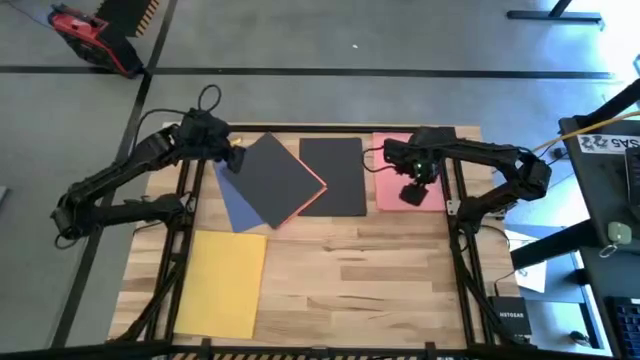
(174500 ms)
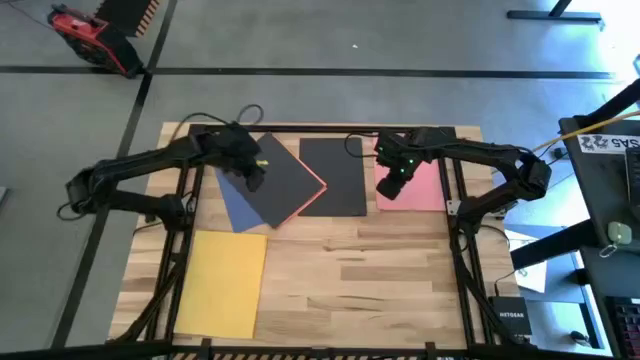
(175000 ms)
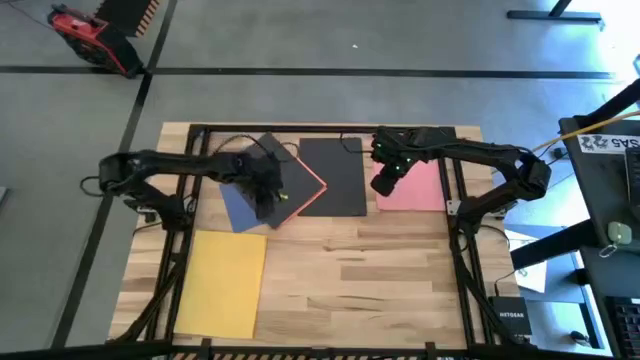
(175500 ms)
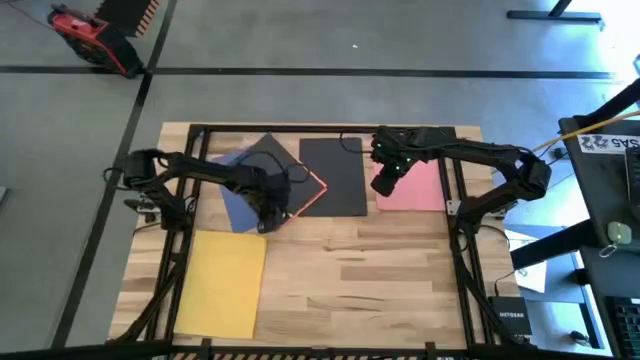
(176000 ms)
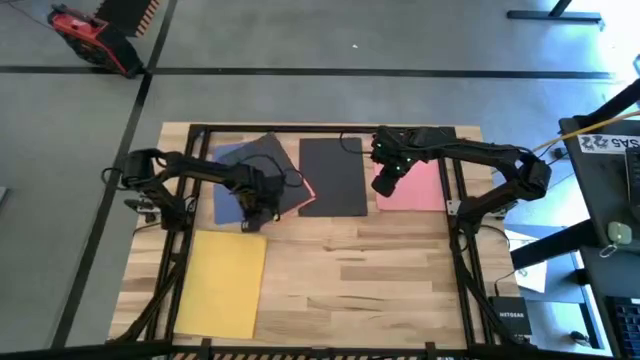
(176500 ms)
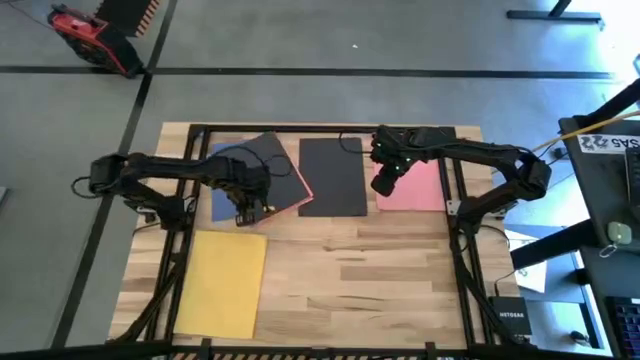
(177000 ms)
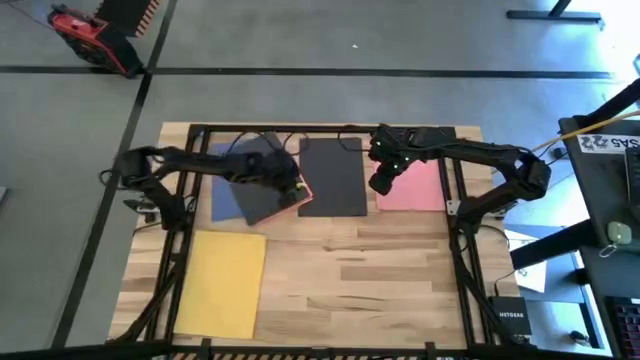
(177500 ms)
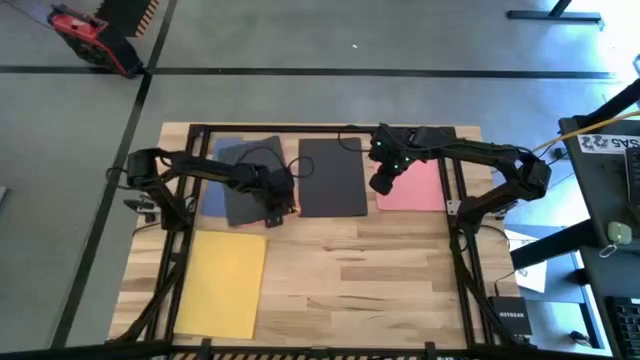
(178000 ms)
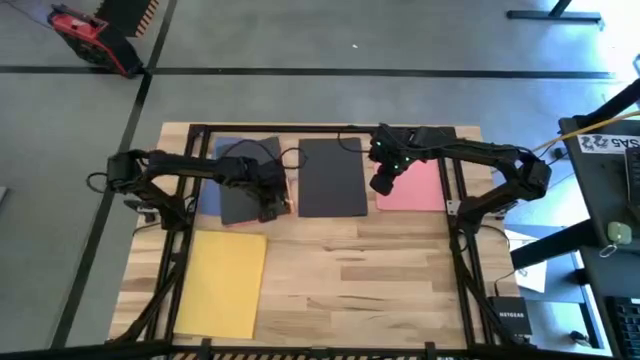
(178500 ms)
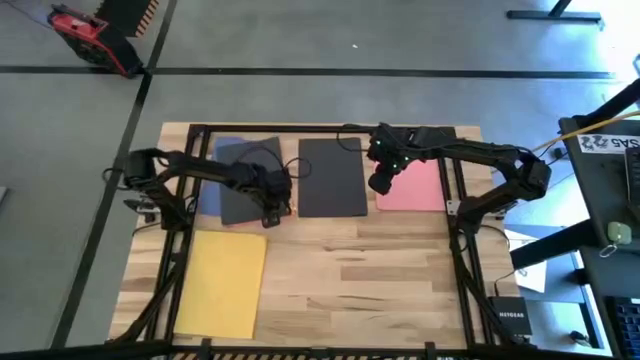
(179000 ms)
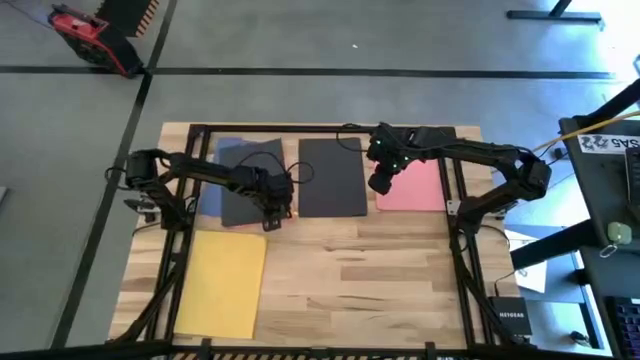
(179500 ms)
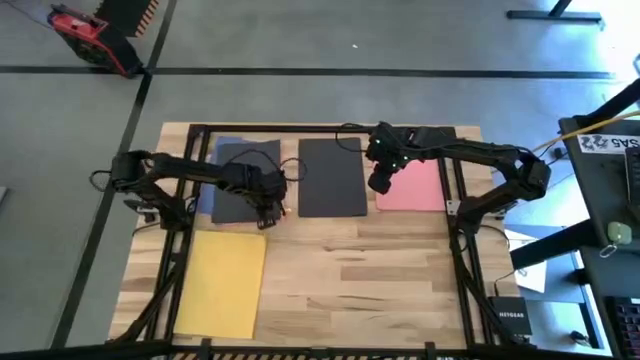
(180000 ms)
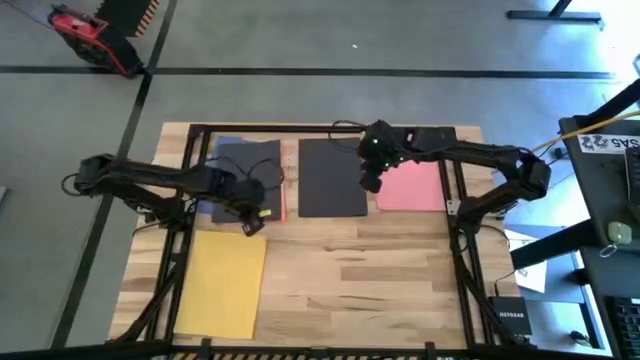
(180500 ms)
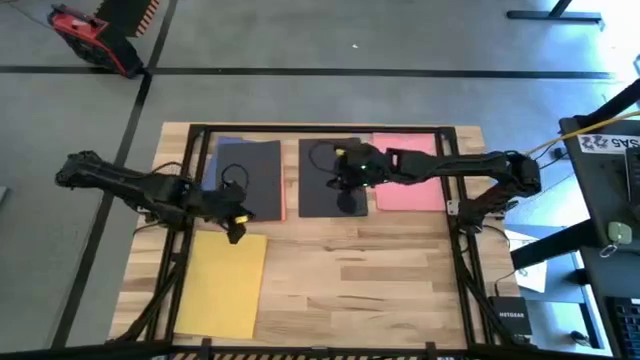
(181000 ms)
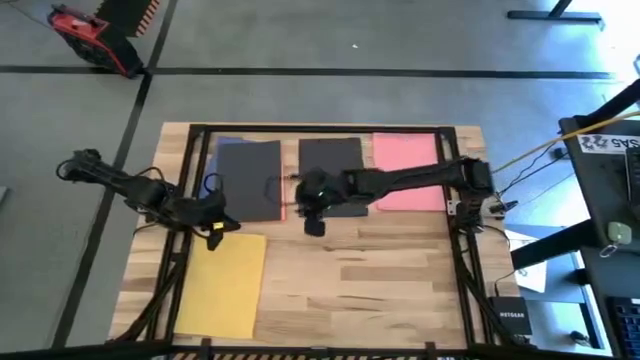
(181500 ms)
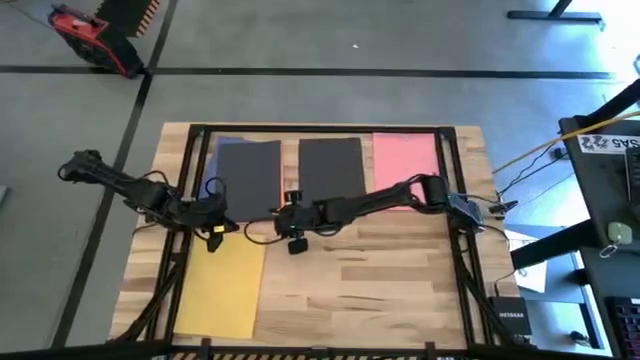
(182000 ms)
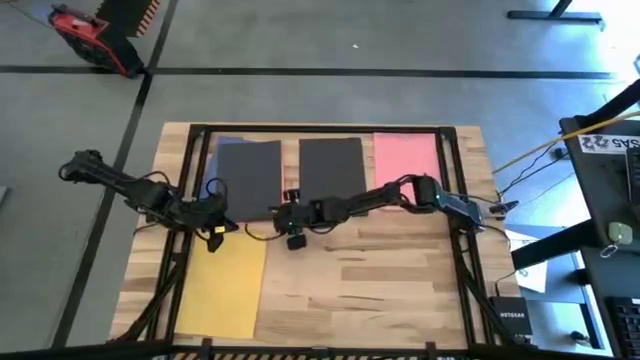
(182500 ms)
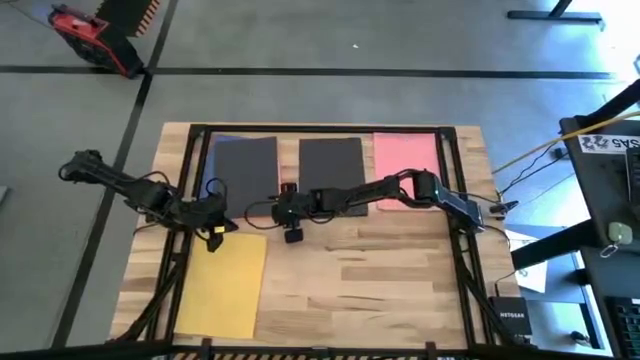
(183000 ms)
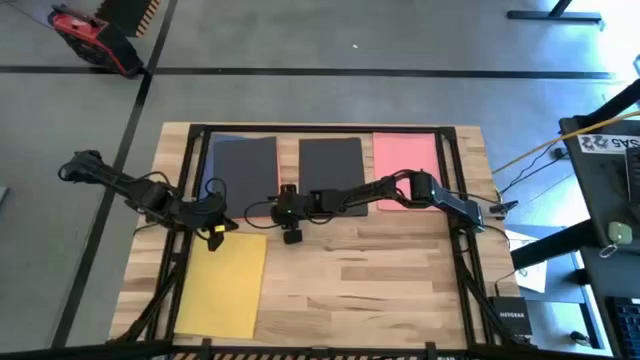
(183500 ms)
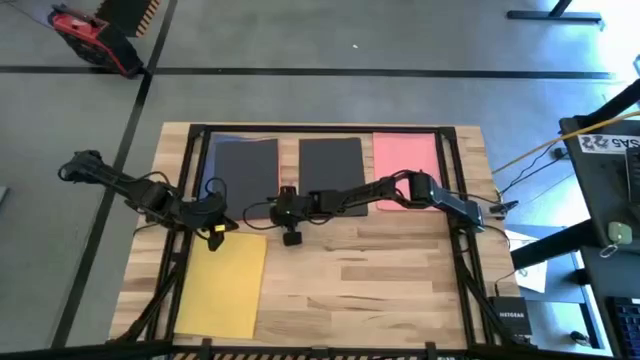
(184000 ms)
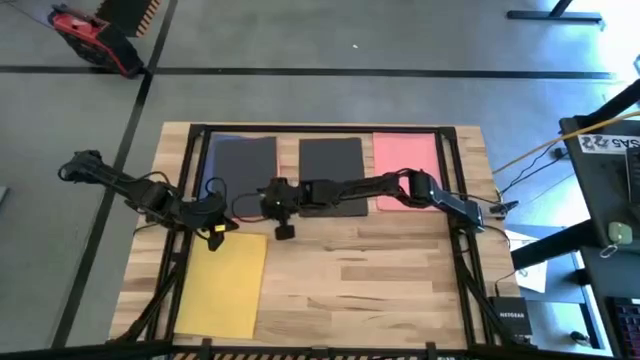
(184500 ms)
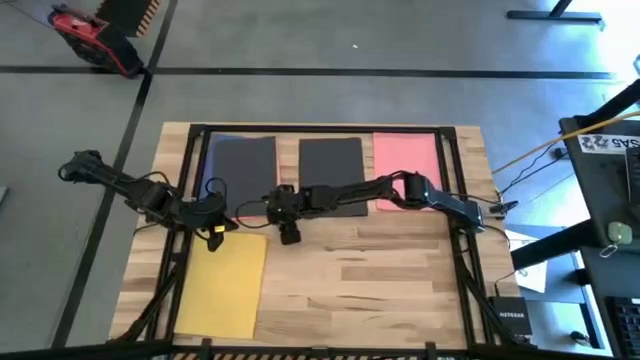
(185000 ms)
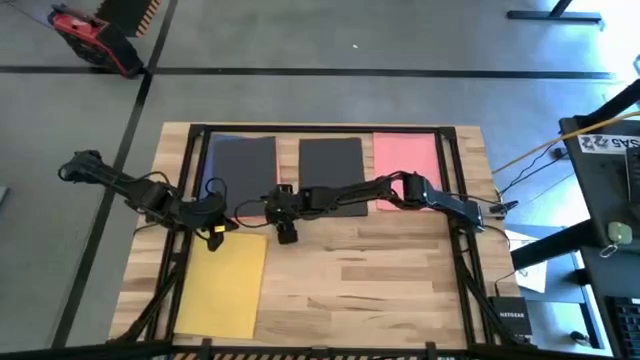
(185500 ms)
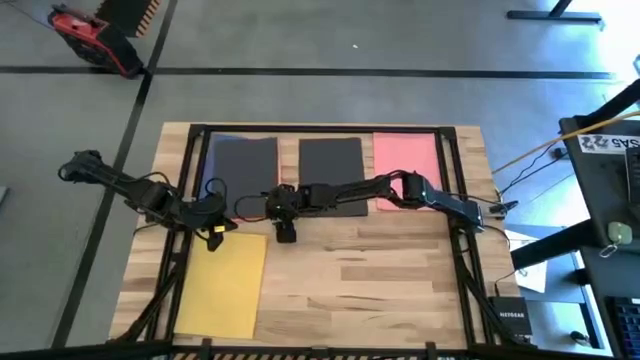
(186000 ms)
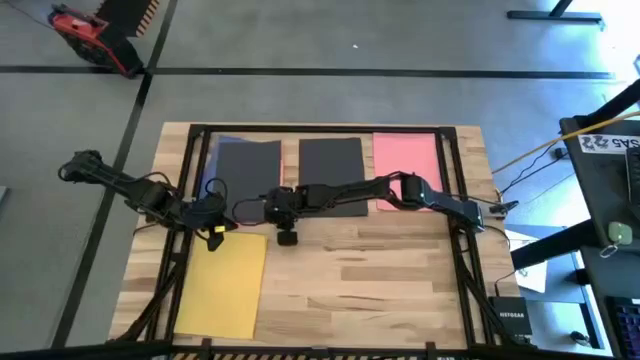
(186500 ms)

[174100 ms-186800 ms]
Task: Organize paper
Stack the black paper on top of the stacked black papers

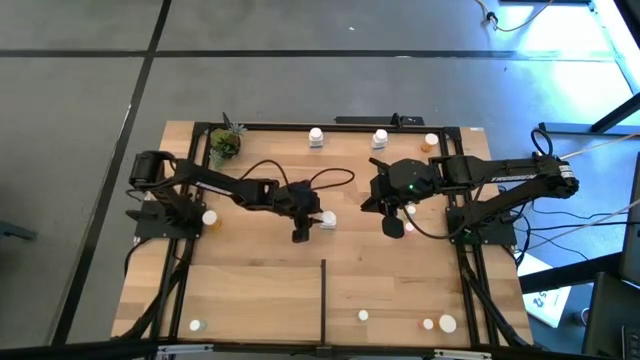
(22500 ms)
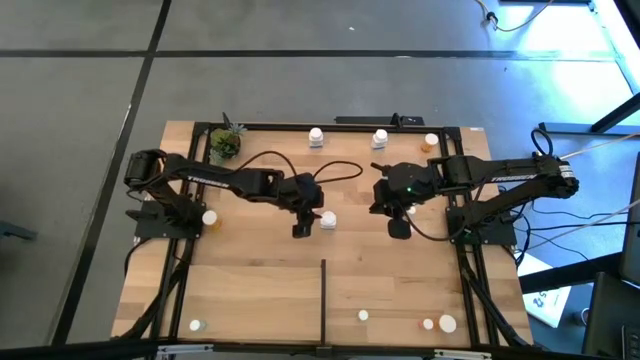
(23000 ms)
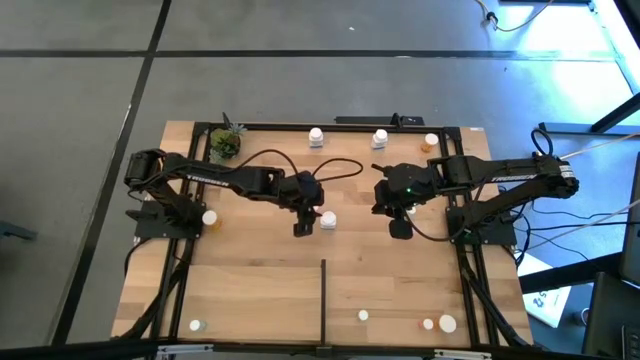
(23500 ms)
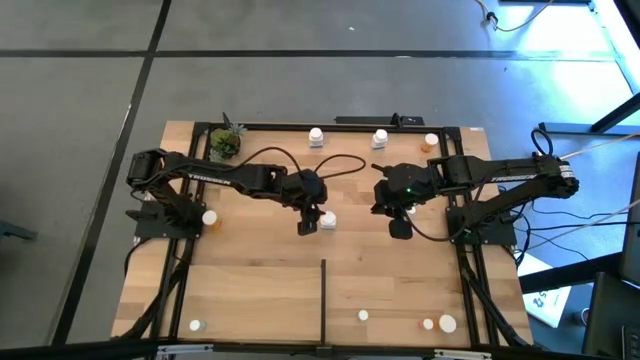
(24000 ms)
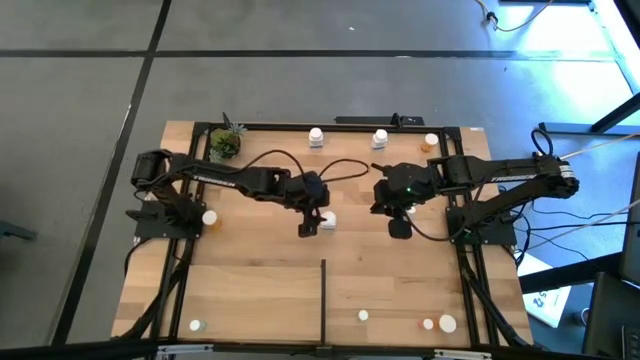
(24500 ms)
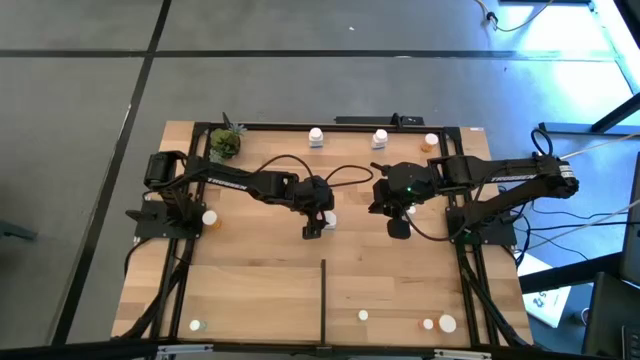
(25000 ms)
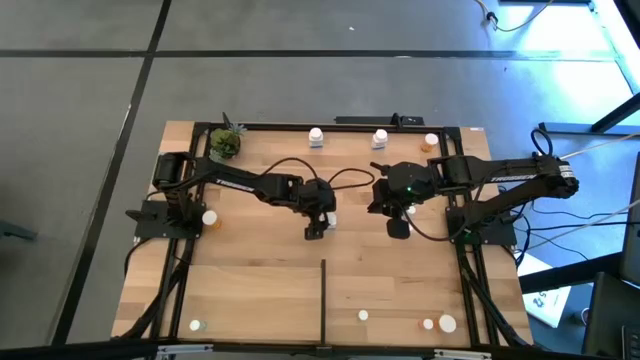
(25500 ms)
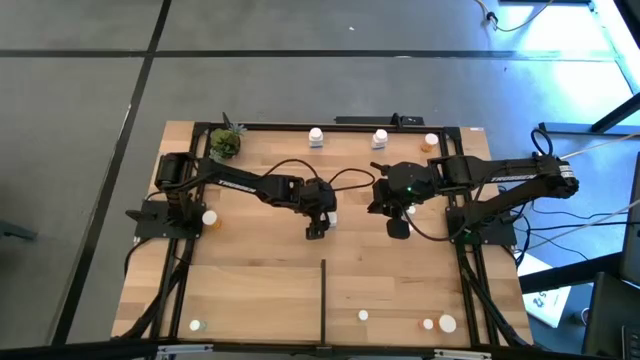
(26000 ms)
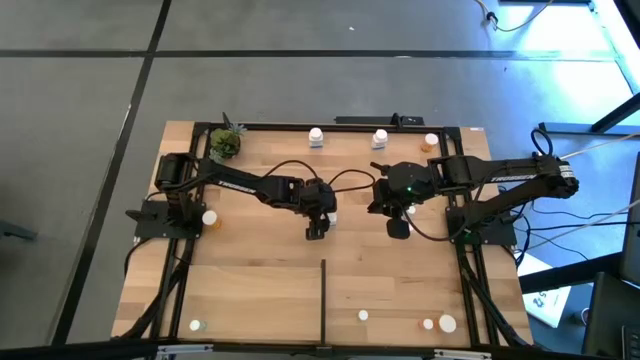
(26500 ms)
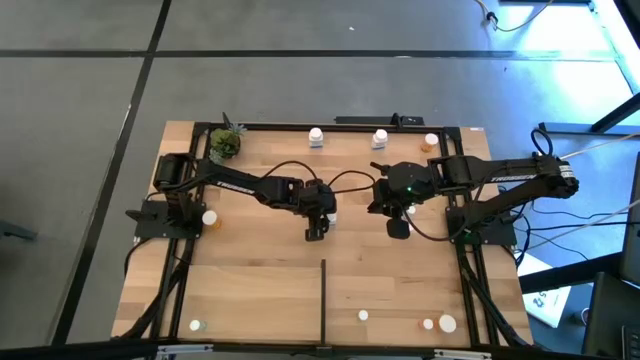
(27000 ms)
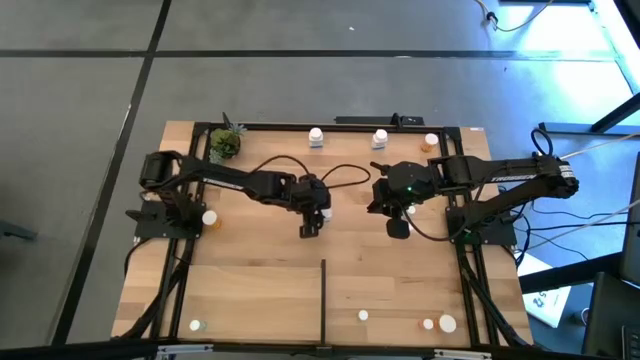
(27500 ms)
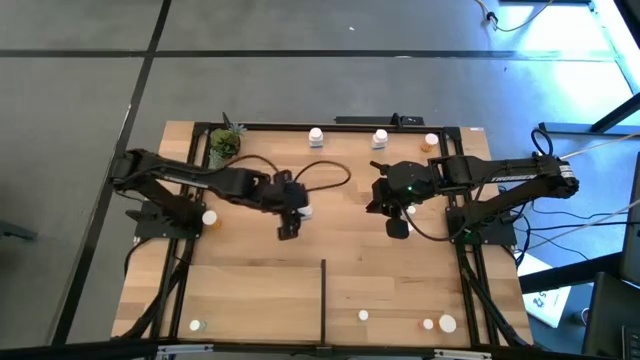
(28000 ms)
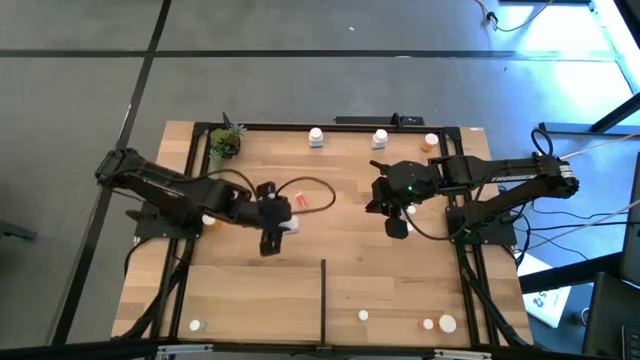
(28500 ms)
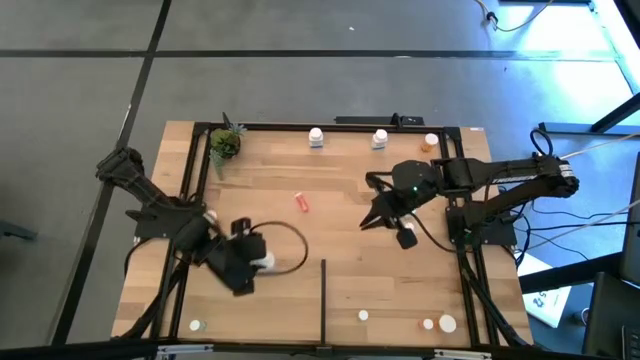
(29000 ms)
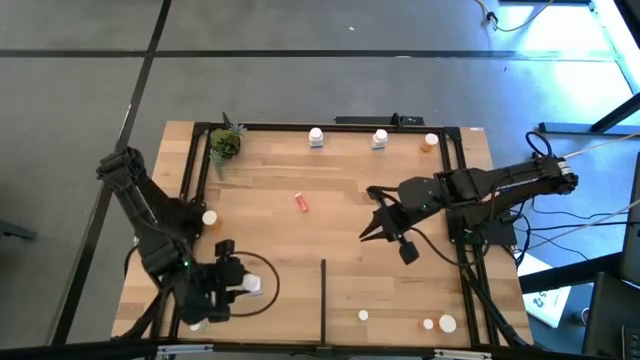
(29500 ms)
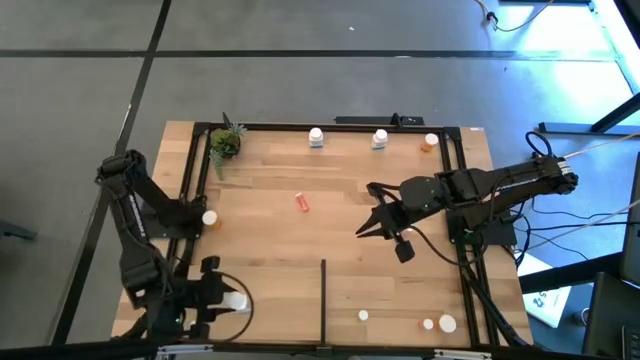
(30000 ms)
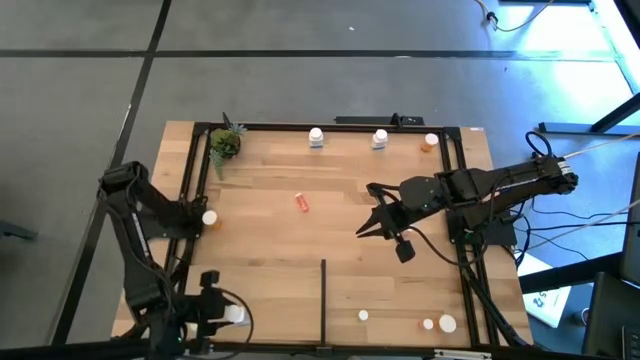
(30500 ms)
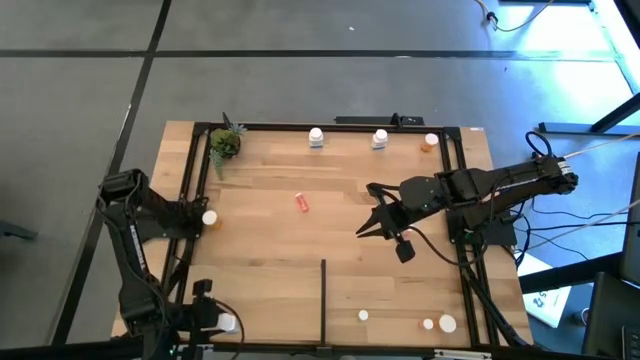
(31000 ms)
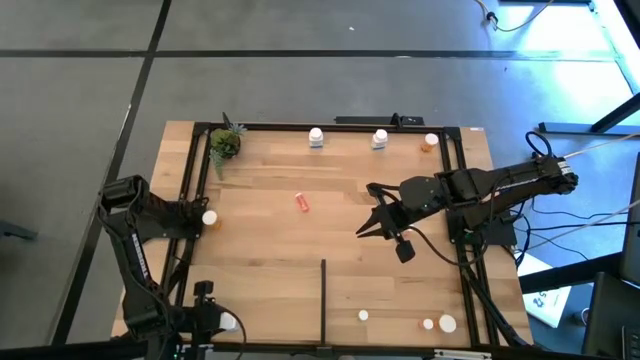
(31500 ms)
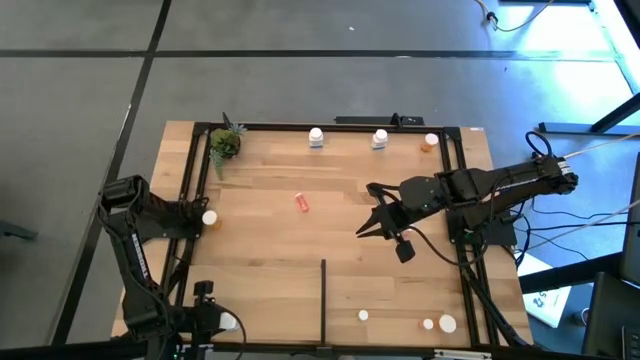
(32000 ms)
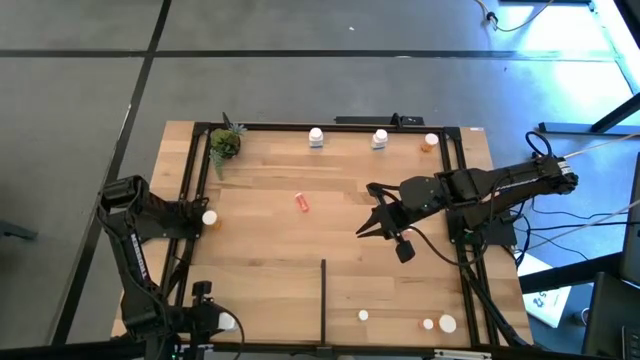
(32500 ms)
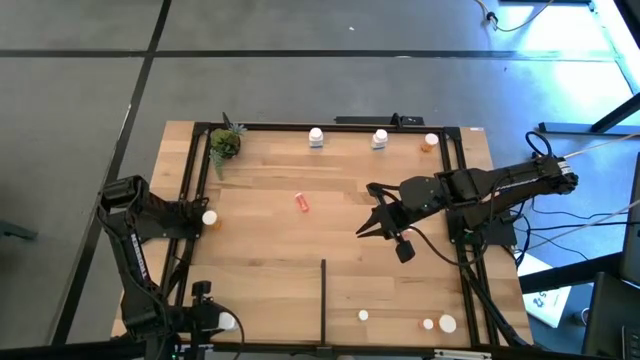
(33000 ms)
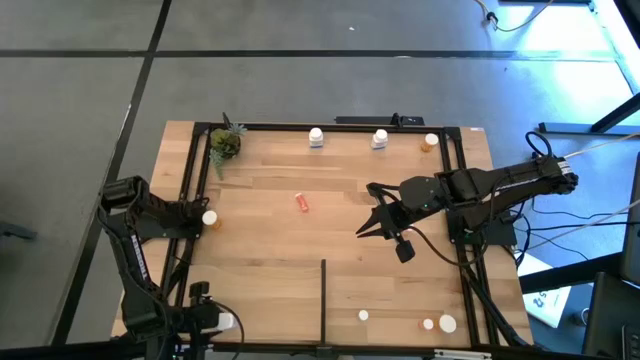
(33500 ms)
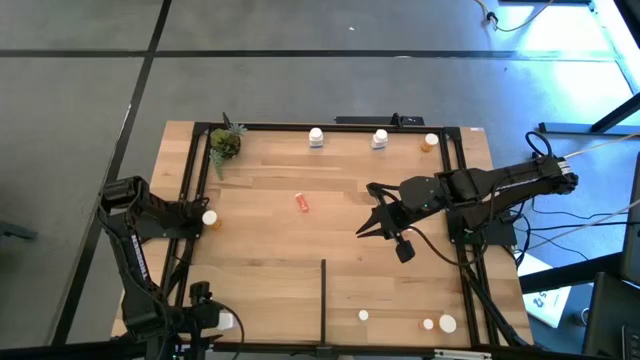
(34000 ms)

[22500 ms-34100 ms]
Task: Pick and place medicine bottles onto shelf by color
Put the bottom white pill bottle on the shelf
